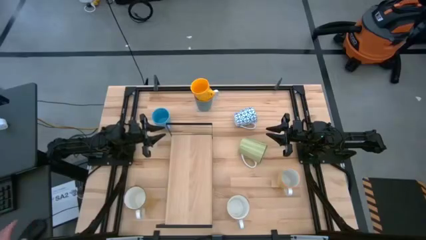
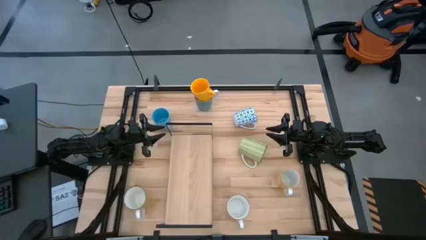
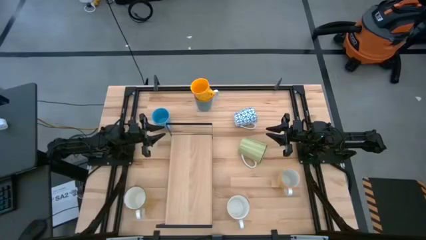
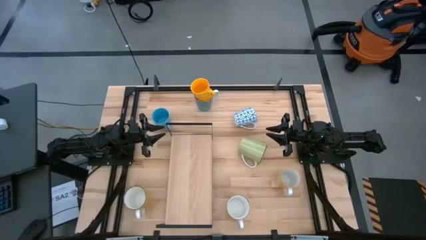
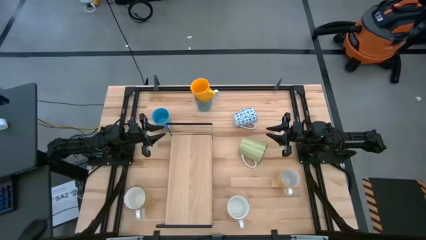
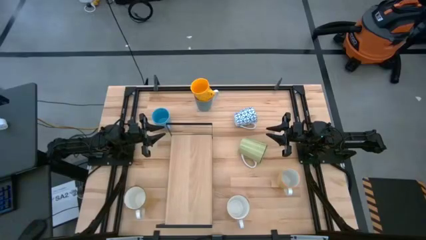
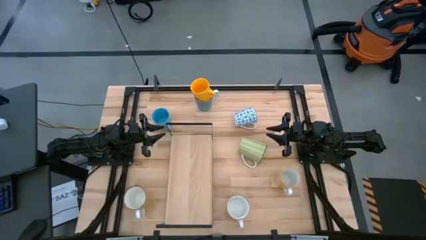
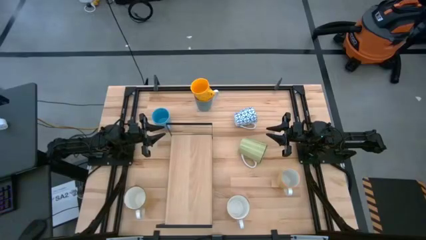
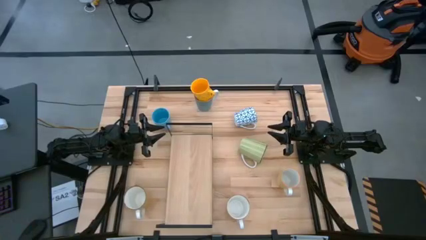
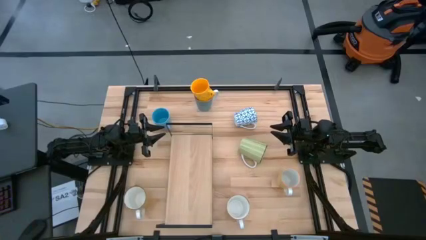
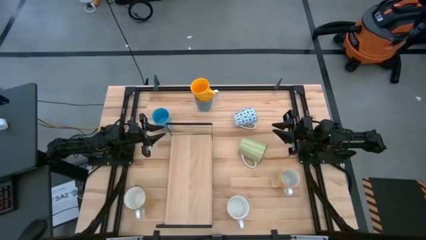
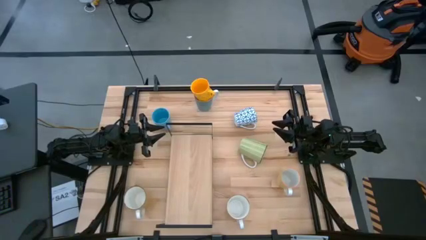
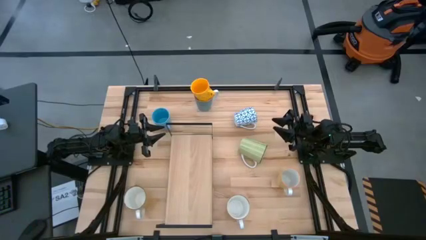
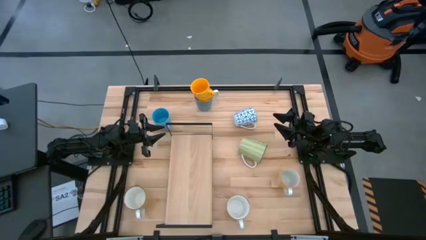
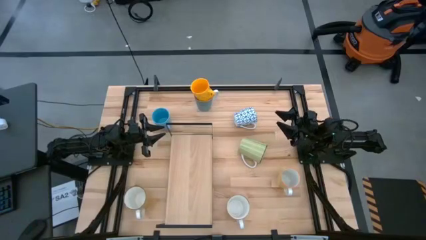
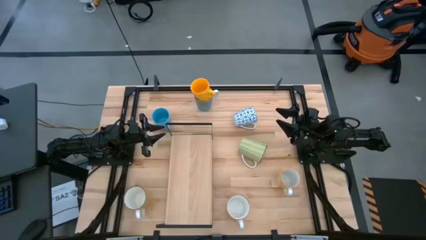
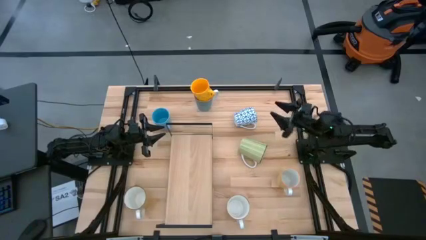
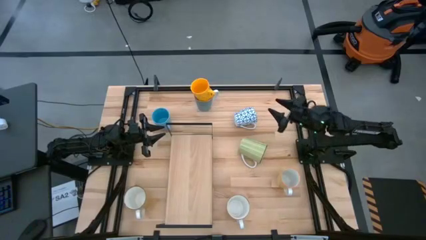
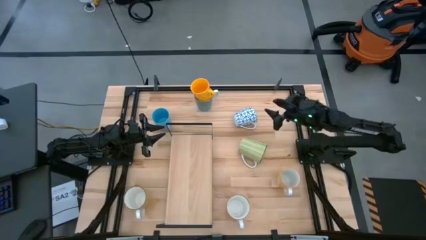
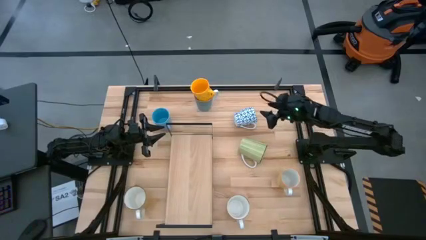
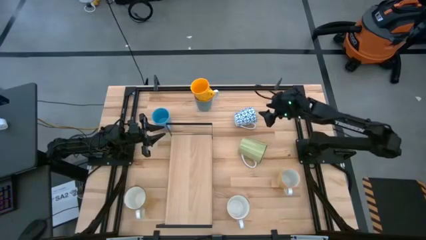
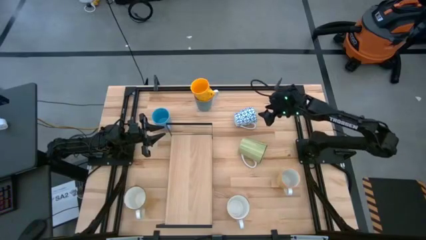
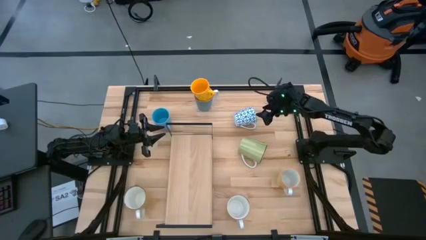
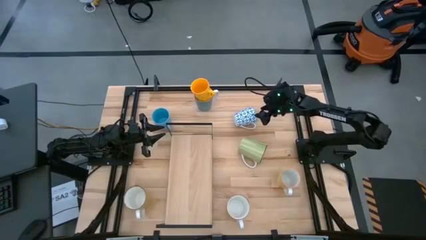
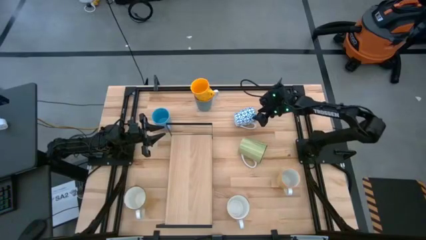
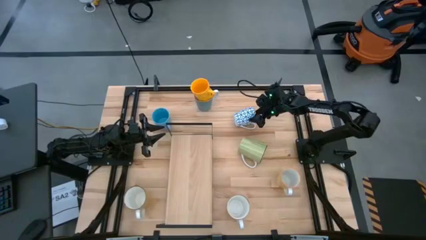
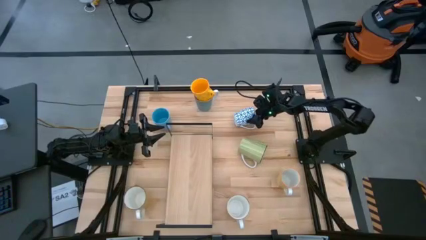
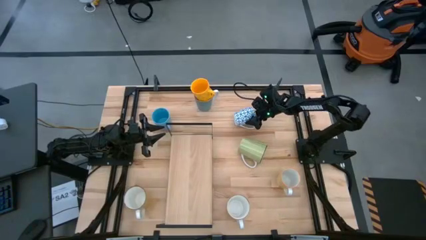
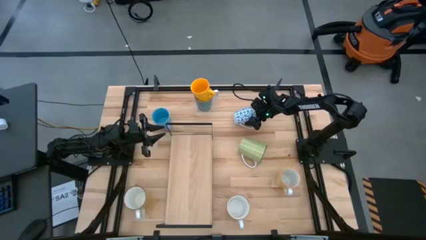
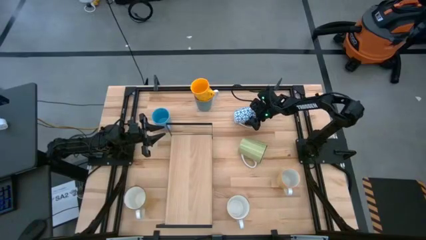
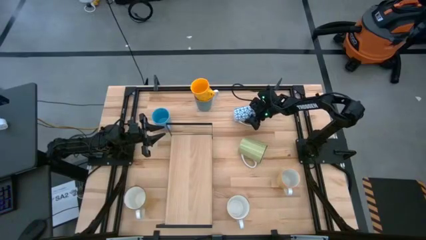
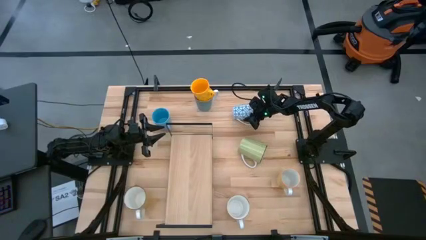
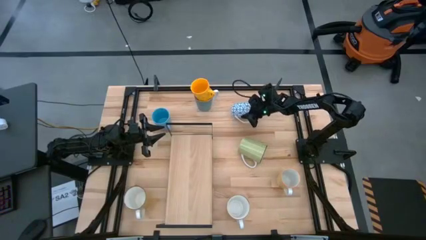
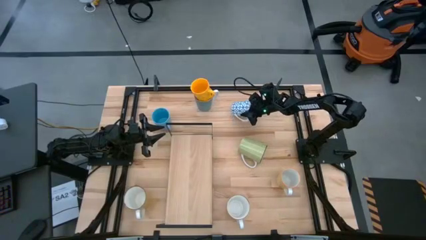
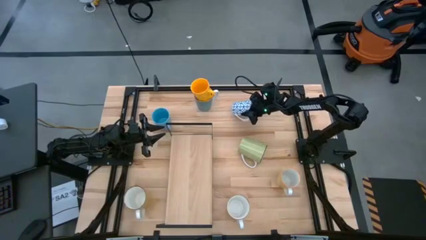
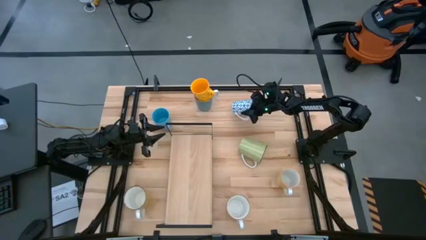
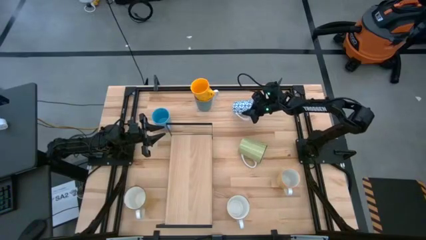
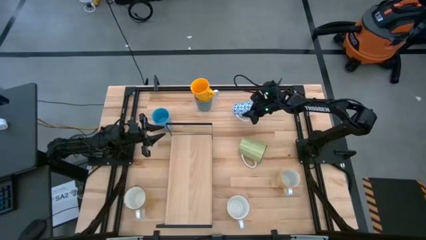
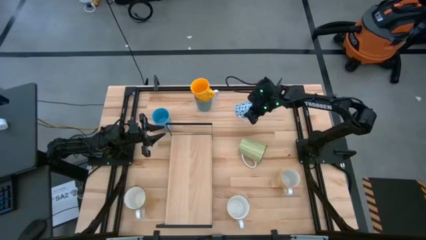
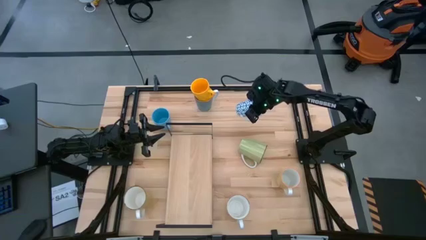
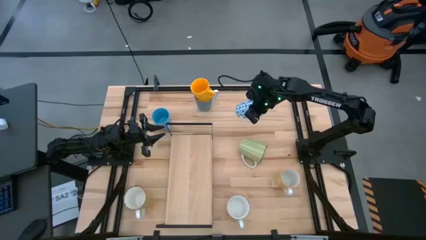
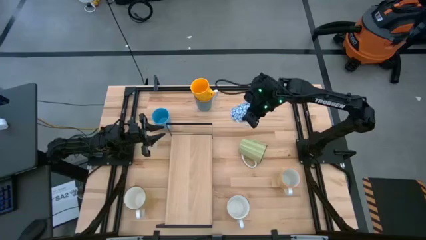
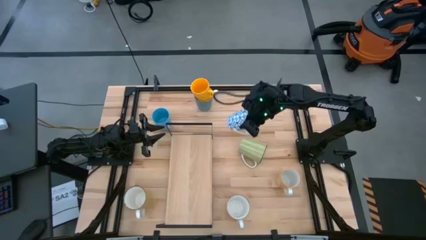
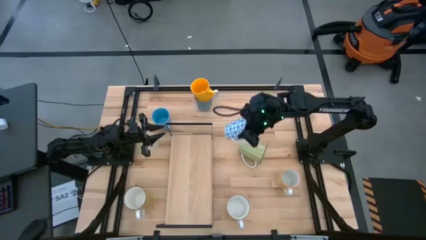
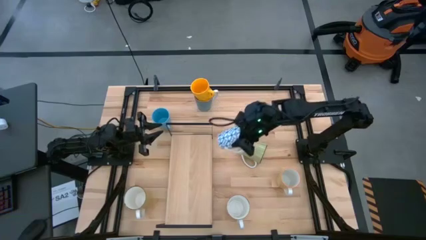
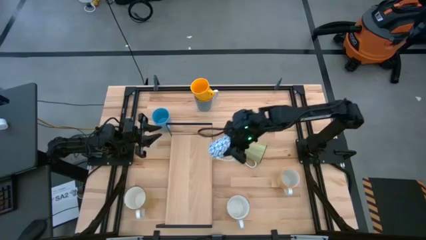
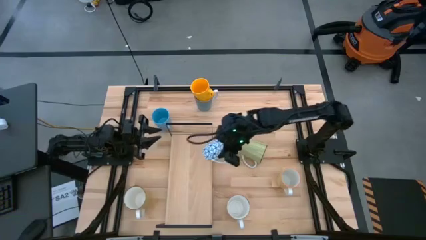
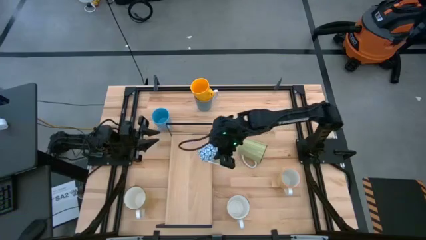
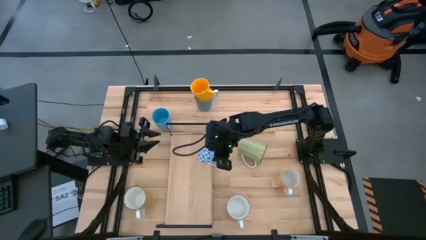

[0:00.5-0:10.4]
Task: Place coffee mugs
Put the white blue mug on the shelf
